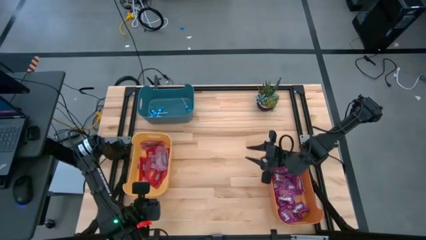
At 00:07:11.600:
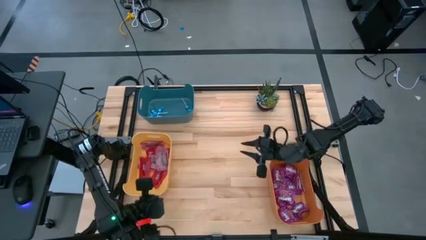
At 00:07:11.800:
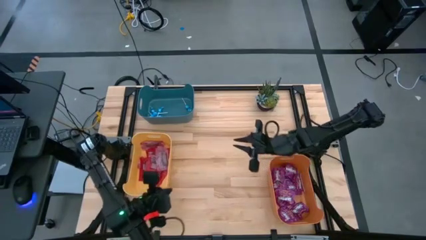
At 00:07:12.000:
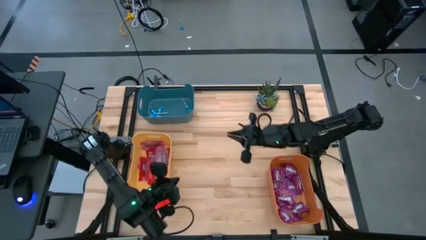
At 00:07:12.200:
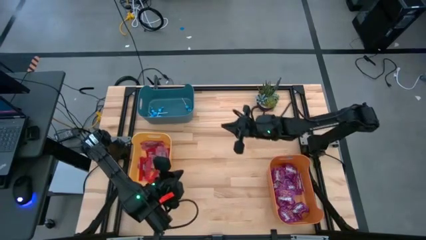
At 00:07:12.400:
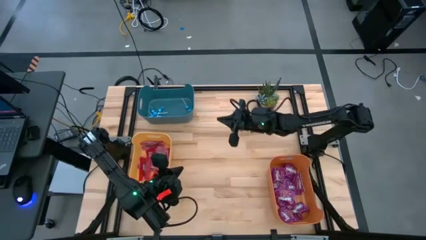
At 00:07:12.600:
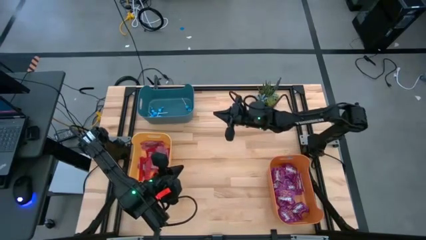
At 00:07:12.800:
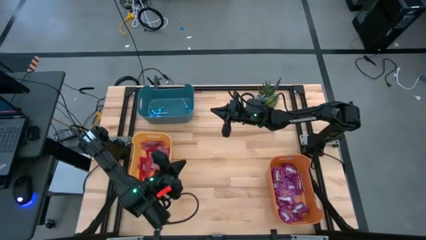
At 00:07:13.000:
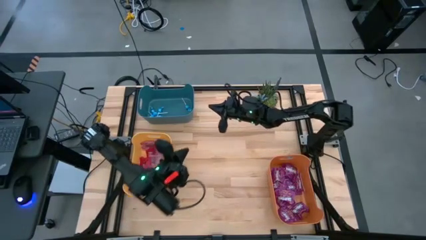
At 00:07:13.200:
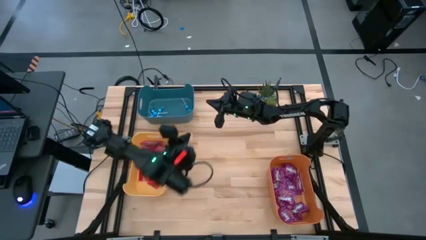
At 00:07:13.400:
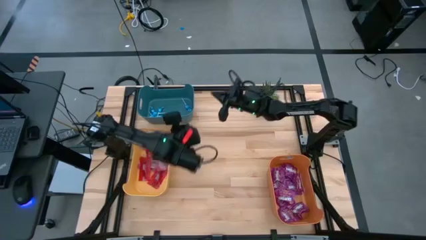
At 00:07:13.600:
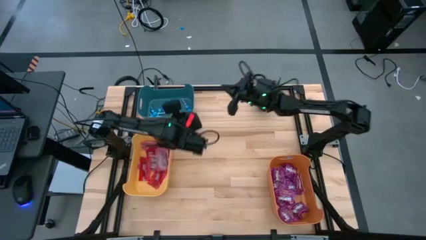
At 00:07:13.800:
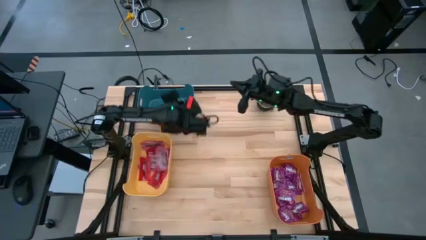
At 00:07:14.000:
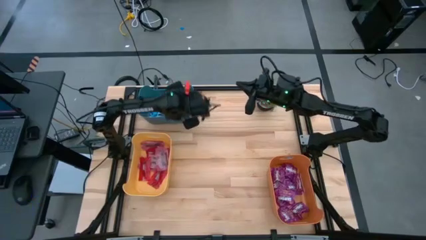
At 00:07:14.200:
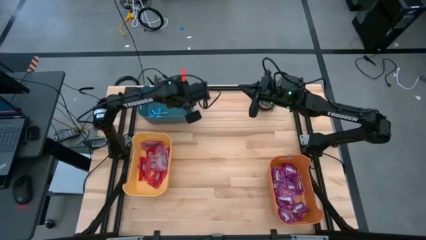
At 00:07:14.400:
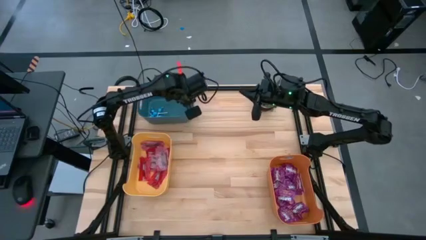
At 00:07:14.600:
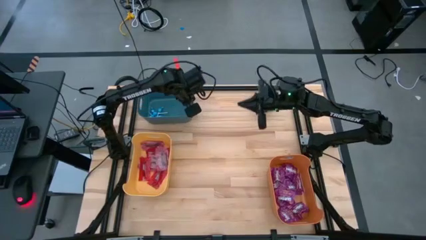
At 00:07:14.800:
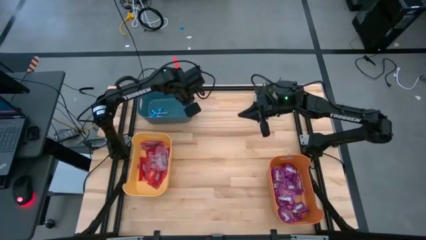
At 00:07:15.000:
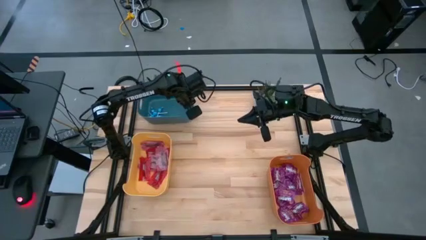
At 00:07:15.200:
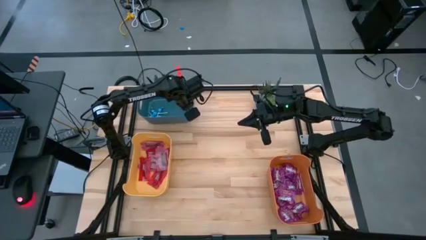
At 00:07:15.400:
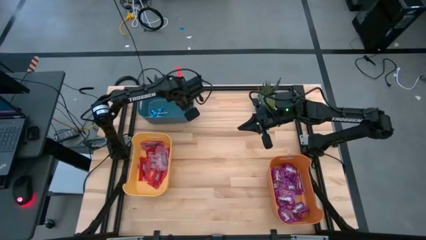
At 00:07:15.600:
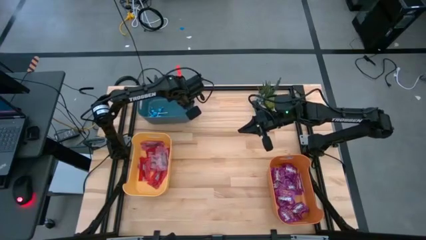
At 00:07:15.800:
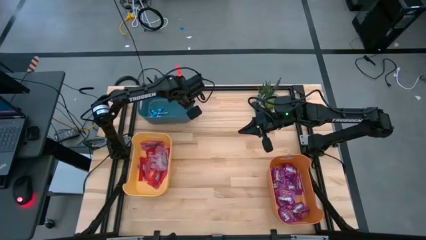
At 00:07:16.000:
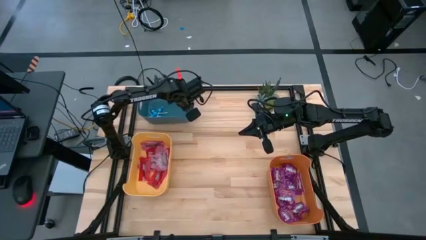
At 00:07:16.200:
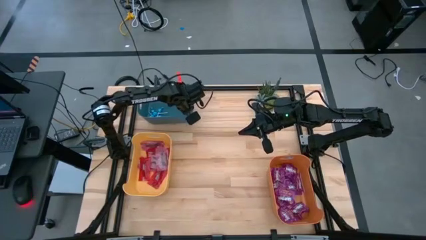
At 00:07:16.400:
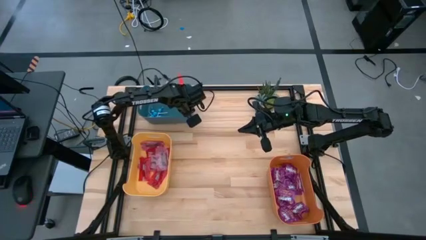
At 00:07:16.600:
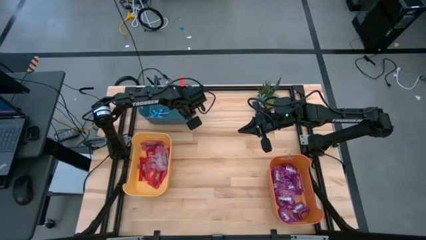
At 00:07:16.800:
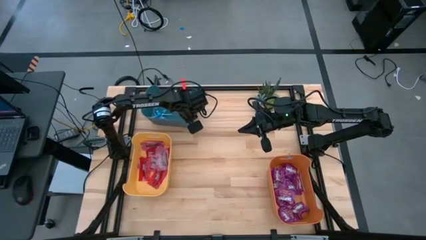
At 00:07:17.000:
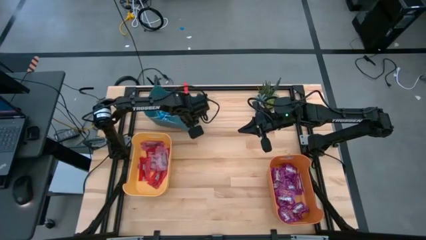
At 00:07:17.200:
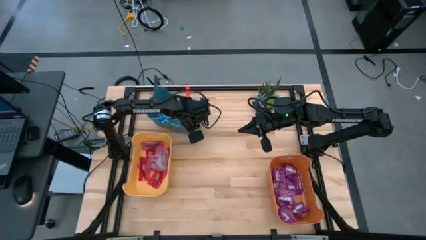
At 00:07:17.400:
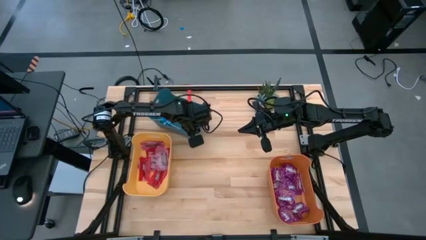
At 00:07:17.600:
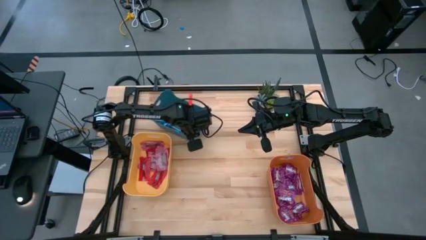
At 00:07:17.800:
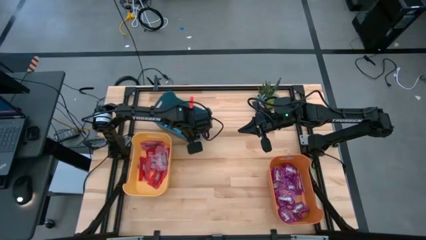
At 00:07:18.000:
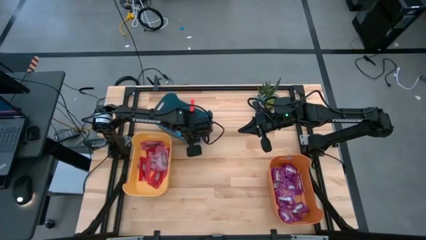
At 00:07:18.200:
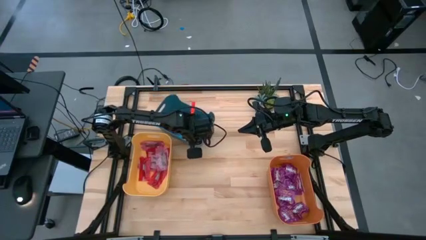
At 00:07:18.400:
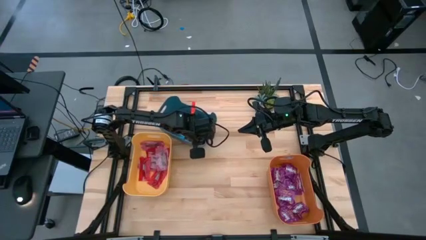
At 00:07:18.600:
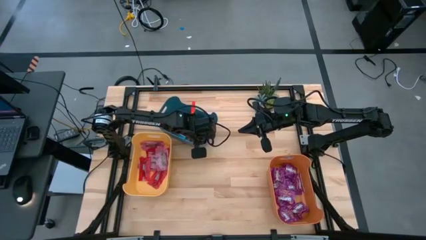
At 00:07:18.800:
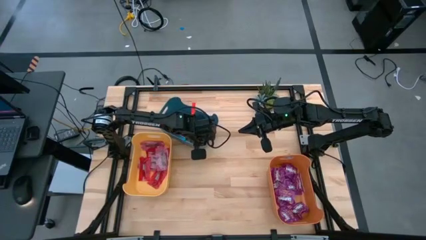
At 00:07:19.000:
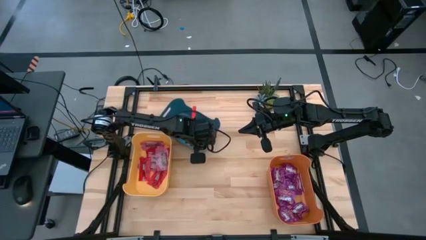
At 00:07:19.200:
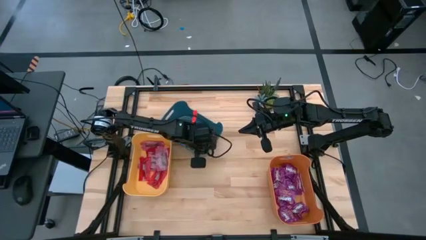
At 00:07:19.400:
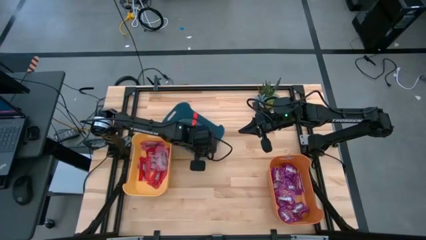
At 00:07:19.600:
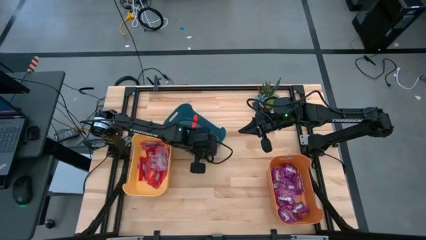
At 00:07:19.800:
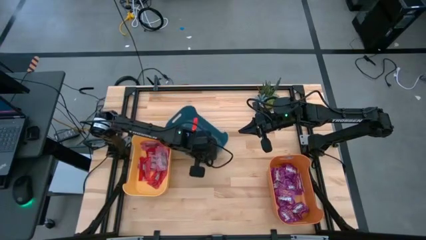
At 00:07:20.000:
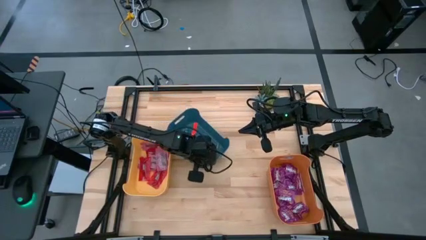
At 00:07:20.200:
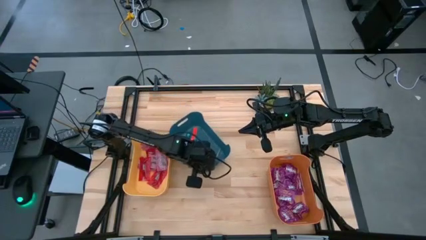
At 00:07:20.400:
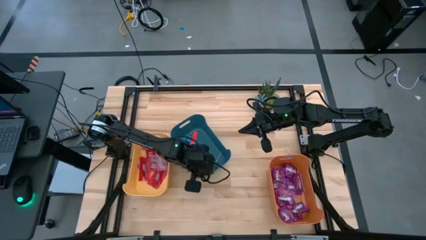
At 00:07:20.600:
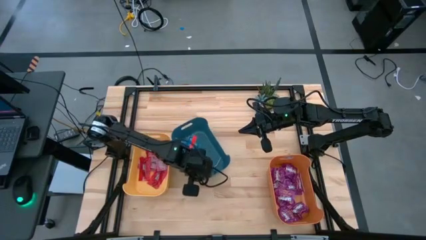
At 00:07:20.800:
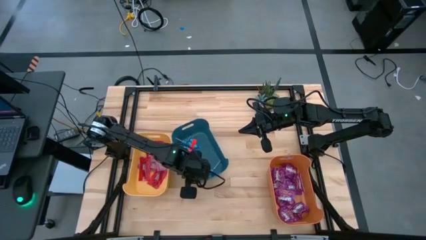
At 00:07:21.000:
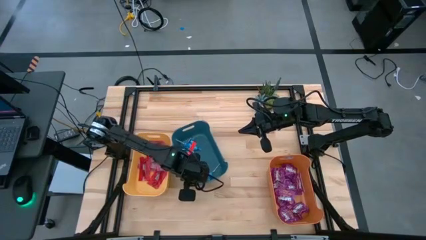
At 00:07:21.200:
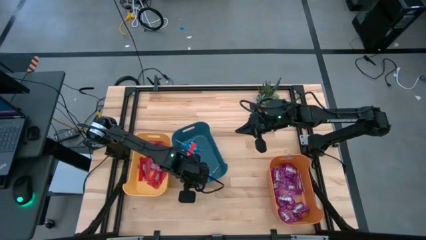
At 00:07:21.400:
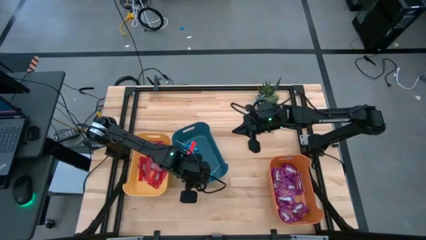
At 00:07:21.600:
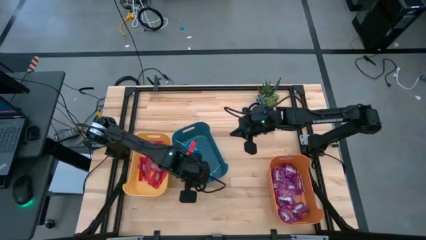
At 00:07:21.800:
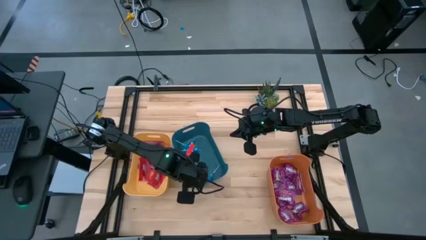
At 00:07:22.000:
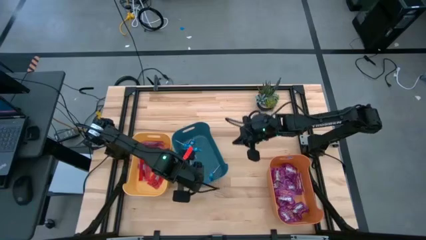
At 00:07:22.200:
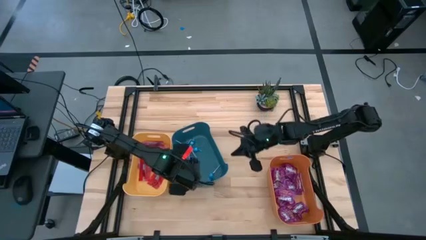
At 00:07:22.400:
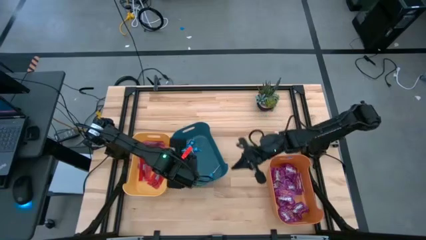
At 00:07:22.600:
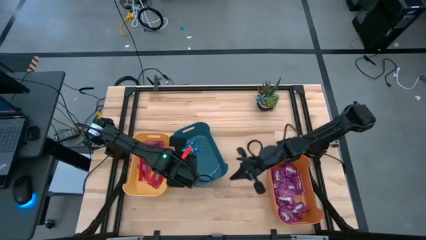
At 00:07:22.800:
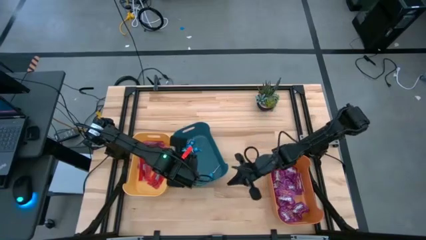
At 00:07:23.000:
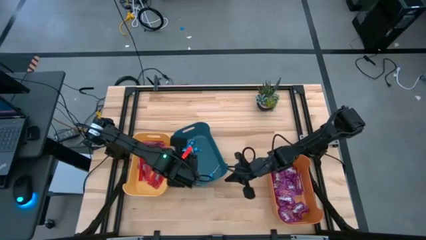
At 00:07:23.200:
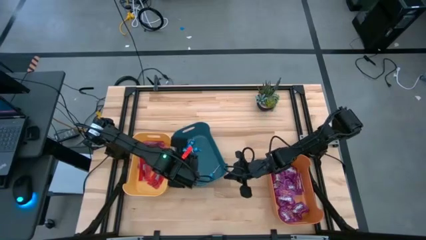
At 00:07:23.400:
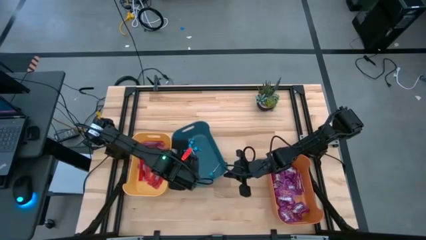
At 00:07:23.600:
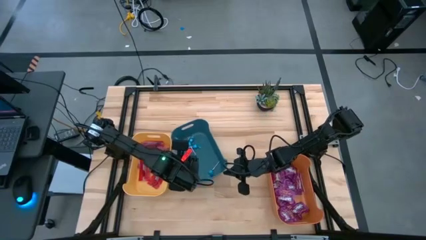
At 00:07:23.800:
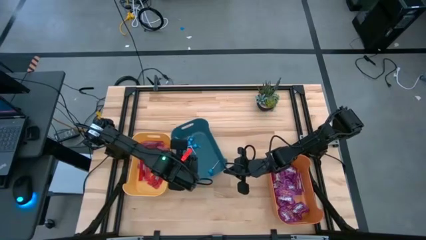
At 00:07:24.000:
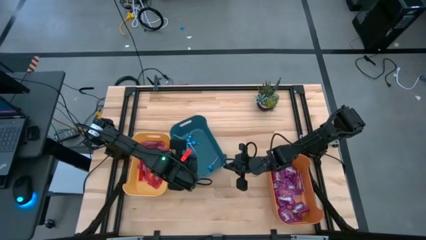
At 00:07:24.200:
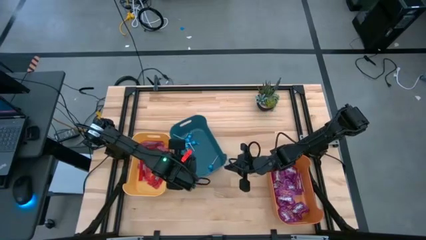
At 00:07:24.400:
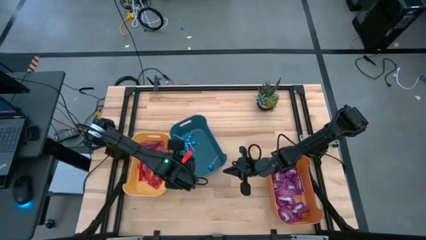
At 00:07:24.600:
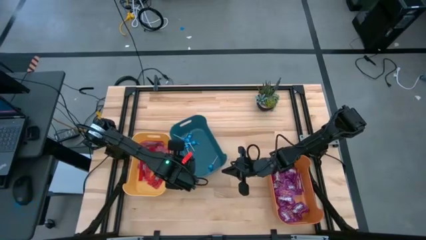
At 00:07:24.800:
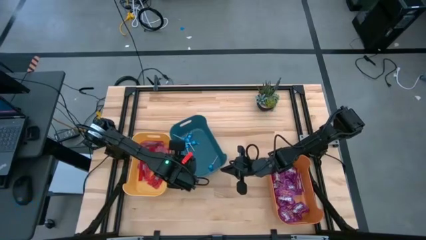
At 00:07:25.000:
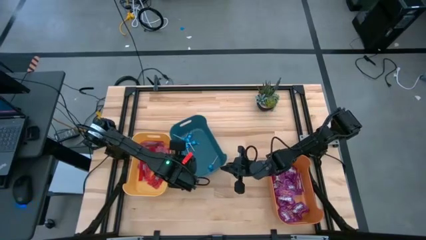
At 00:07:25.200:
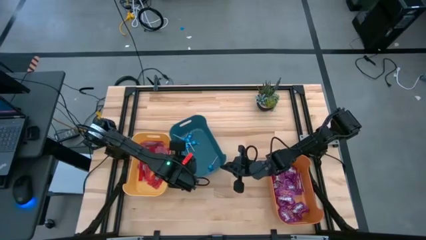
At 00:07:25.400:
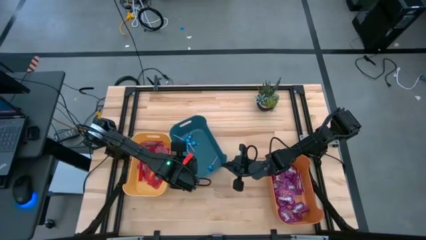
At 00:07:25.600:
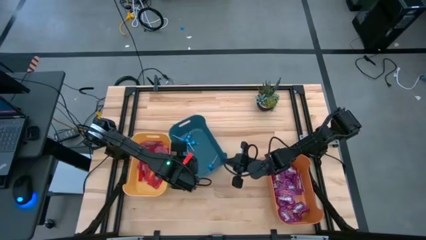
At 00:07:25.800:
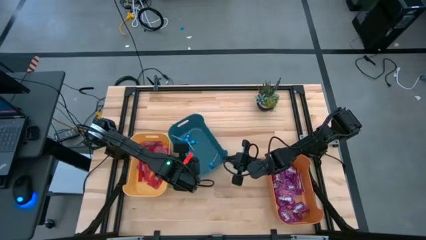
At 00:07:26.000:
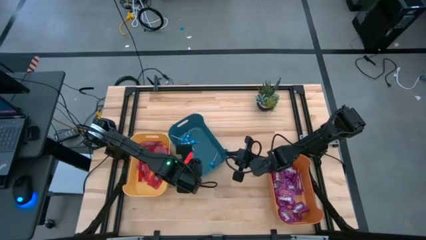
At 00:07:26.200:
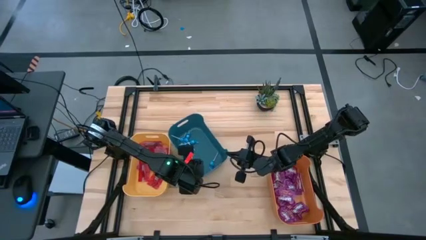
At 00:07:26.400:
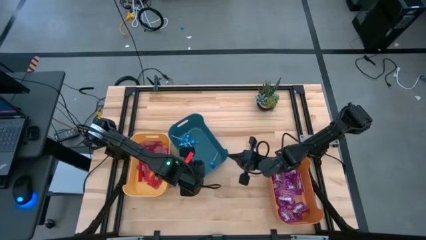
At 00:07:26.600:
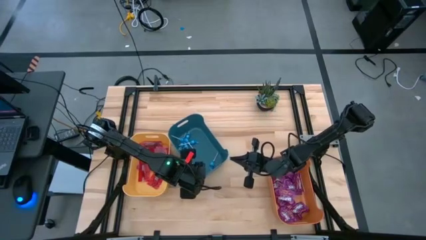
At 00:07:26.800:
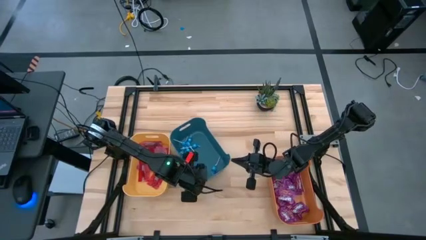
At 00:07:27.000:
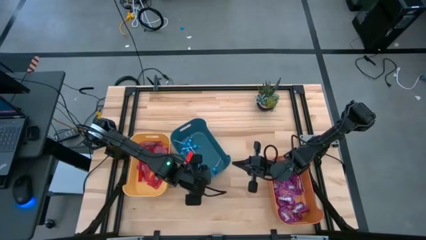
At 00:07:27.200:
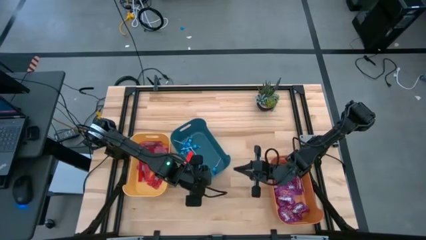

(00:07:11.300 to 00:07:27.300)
Task: Sort candy
Move the blue bin to the center of the table

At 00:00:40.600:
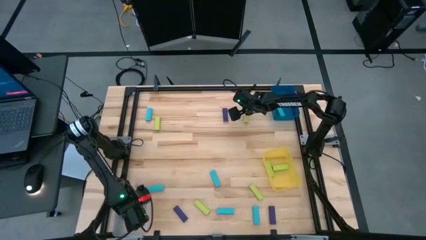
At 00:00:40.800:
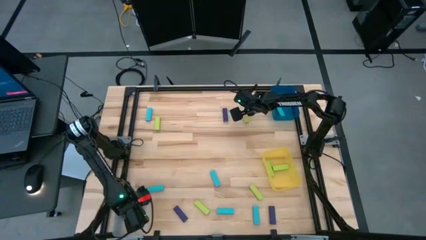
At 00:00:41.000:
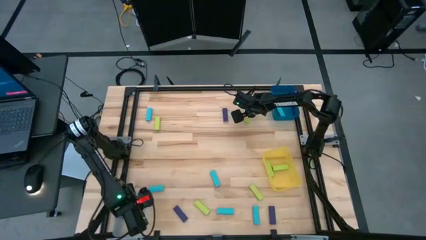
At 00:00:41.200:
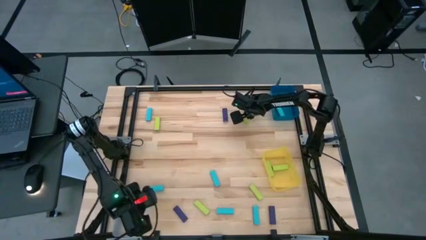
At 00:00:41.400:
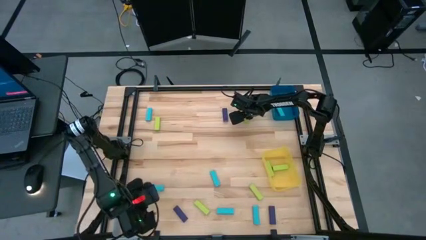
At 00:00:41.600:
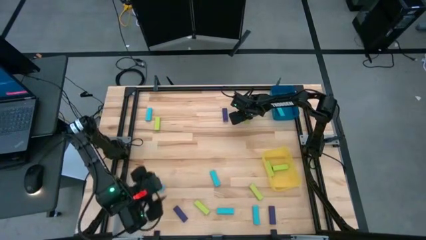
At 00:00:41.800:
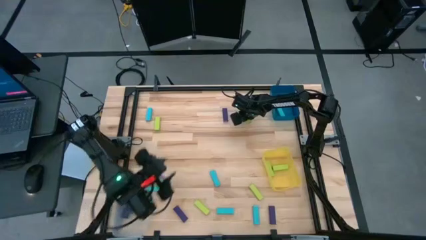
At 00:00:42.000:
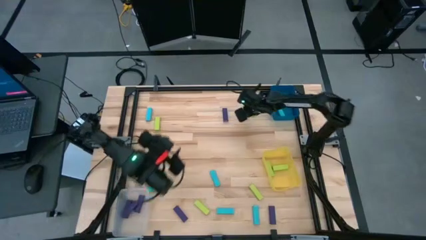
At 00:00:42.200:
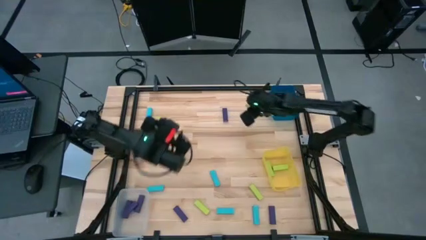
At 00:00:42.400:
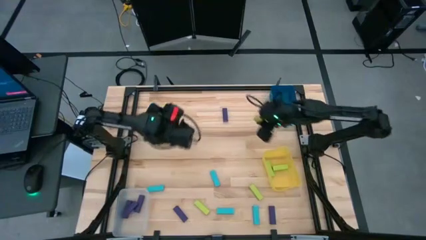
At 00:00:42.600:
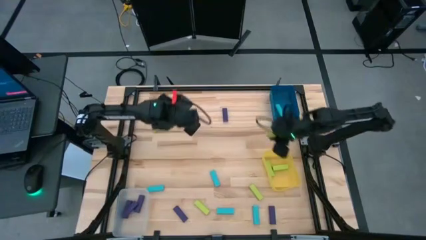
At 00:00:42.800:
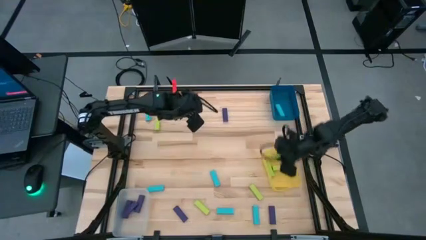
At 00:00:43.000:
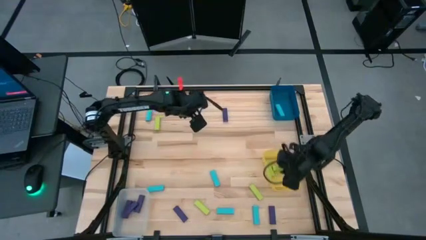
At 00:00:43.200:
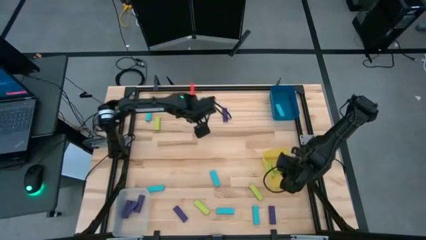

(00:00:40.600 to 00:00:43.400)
Task: Sort blocks
Put the green block into the yellow bin
